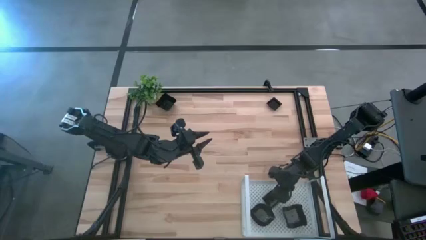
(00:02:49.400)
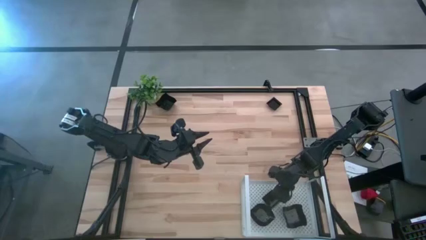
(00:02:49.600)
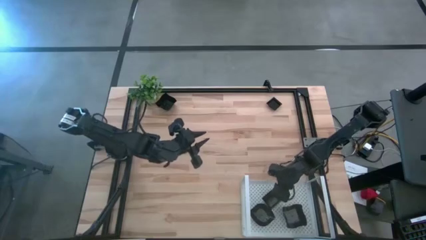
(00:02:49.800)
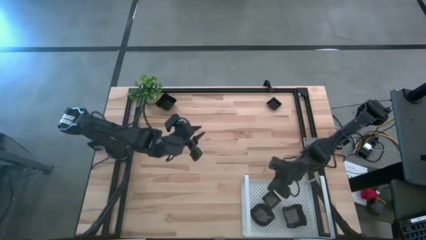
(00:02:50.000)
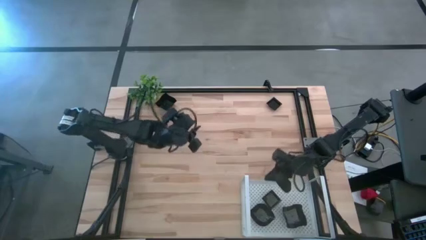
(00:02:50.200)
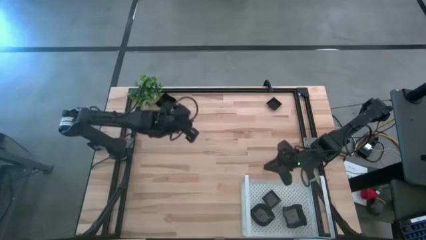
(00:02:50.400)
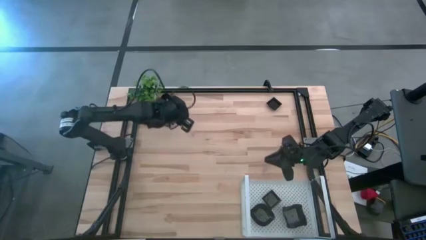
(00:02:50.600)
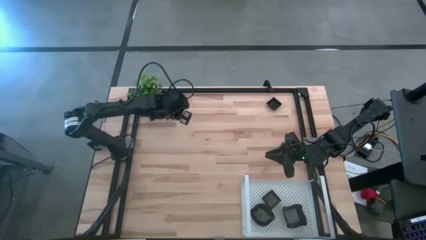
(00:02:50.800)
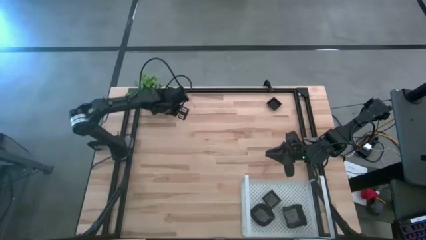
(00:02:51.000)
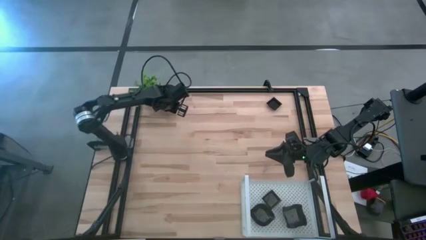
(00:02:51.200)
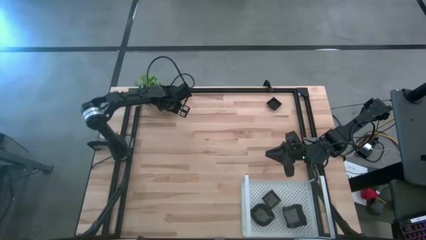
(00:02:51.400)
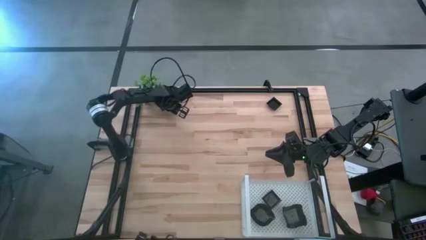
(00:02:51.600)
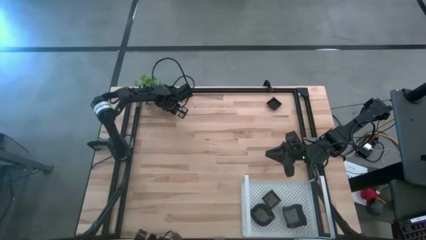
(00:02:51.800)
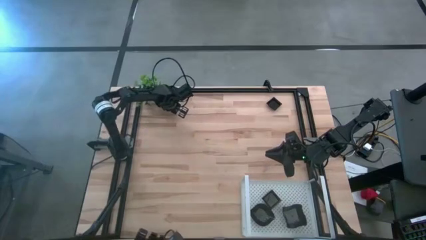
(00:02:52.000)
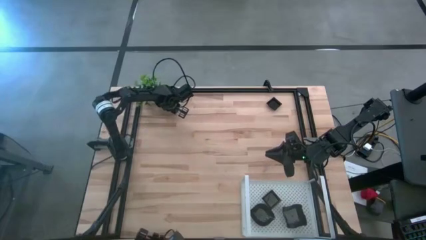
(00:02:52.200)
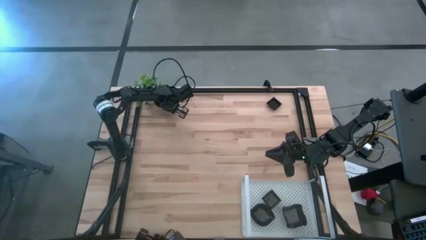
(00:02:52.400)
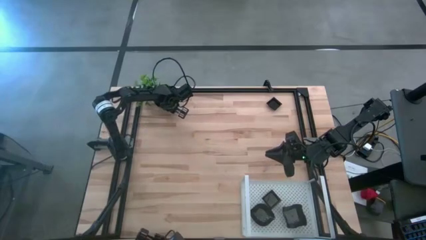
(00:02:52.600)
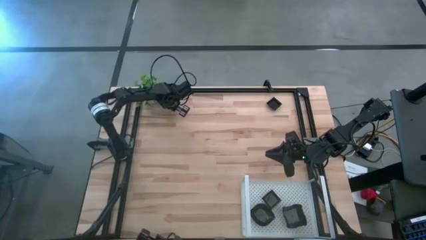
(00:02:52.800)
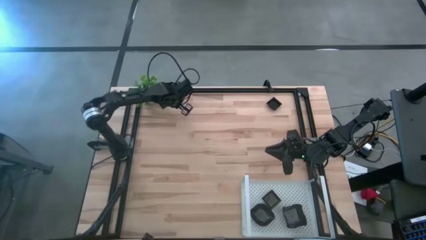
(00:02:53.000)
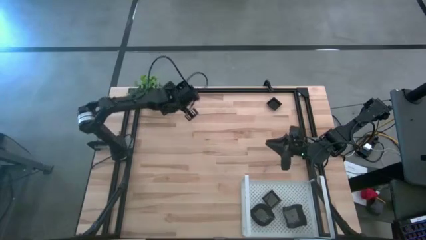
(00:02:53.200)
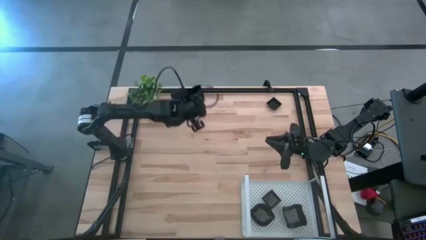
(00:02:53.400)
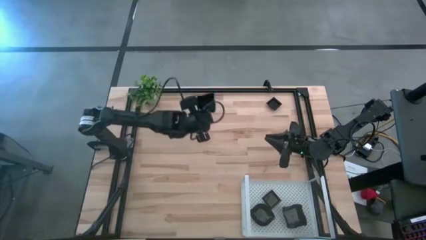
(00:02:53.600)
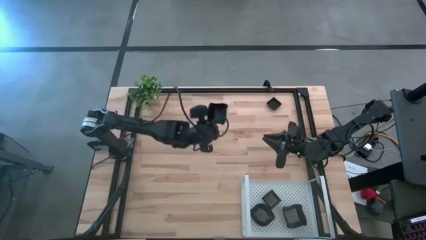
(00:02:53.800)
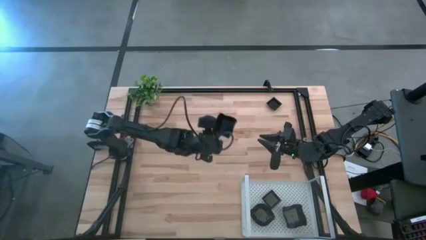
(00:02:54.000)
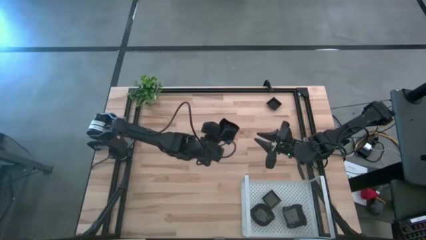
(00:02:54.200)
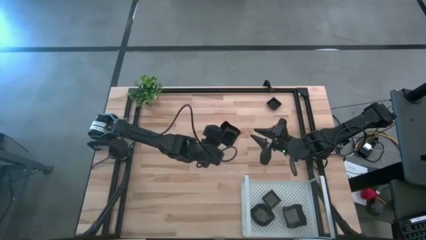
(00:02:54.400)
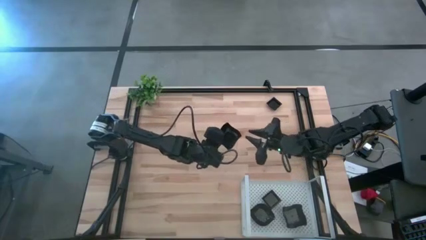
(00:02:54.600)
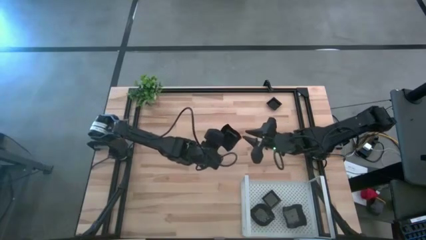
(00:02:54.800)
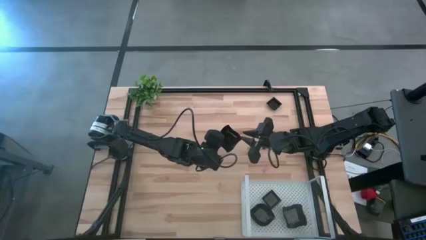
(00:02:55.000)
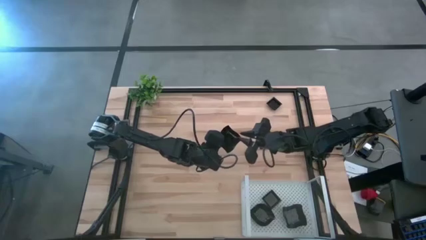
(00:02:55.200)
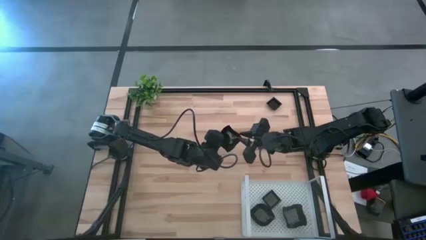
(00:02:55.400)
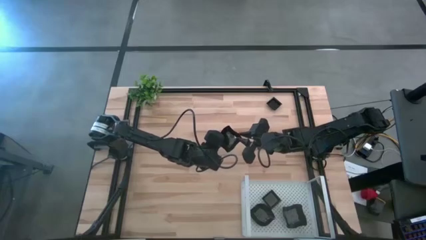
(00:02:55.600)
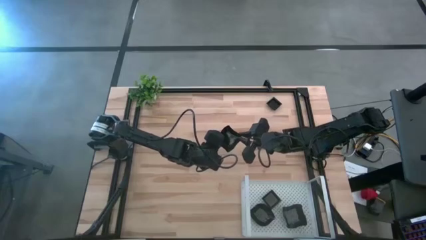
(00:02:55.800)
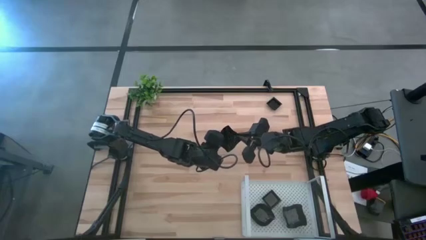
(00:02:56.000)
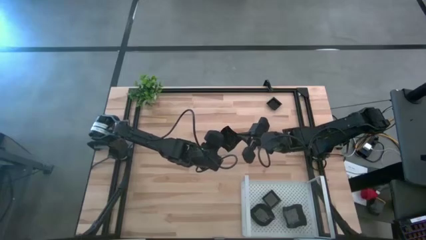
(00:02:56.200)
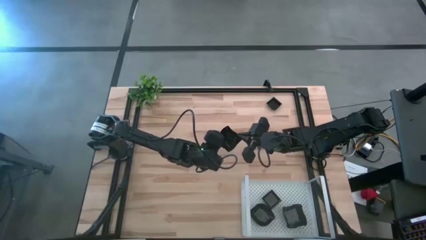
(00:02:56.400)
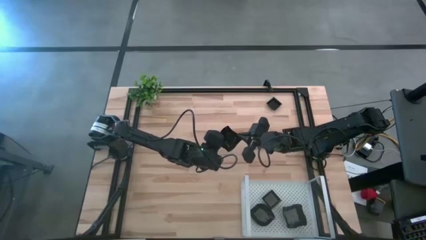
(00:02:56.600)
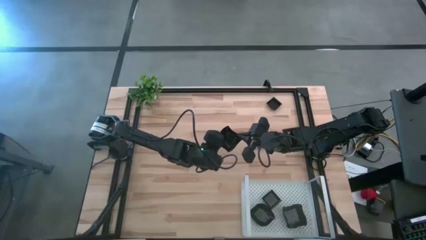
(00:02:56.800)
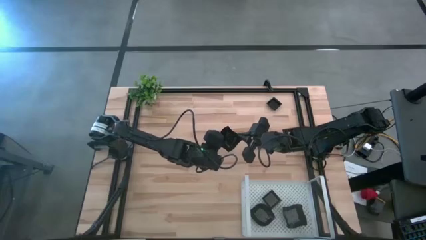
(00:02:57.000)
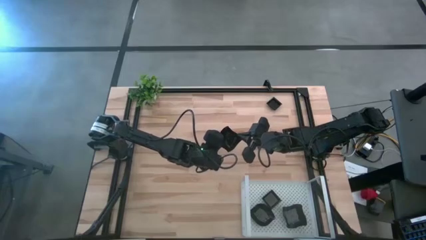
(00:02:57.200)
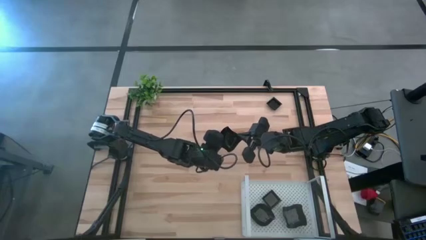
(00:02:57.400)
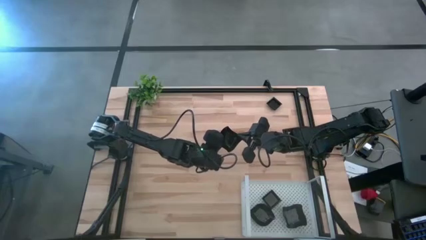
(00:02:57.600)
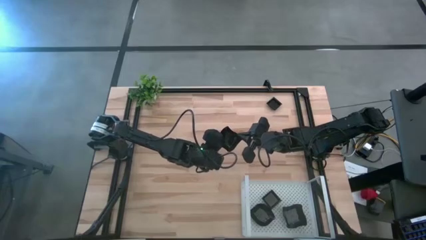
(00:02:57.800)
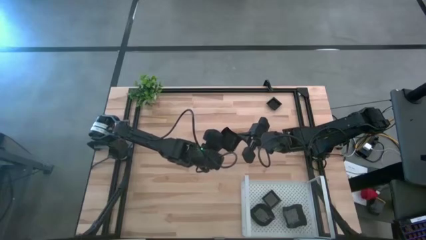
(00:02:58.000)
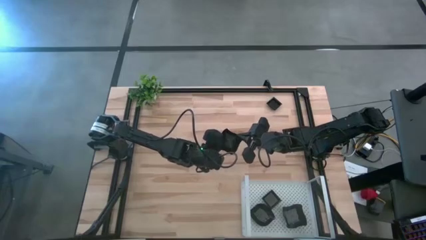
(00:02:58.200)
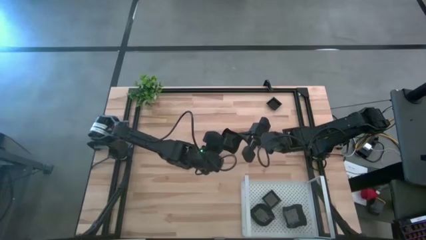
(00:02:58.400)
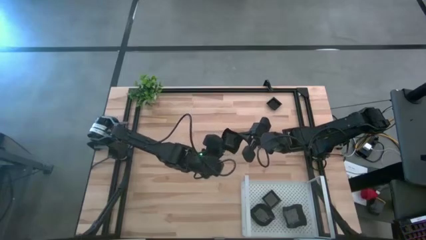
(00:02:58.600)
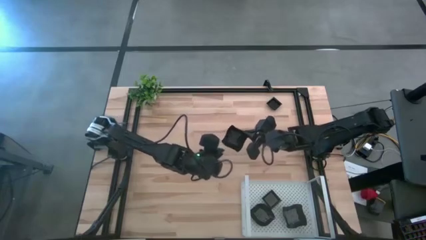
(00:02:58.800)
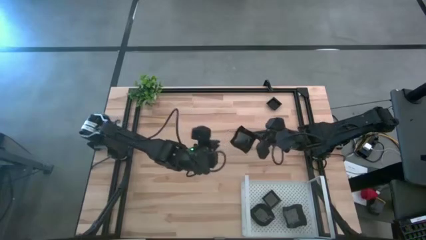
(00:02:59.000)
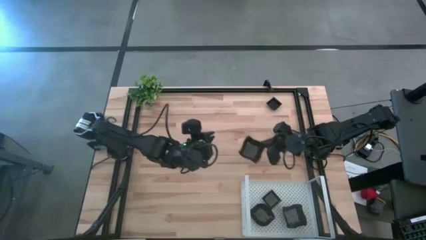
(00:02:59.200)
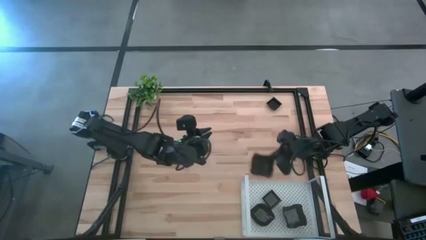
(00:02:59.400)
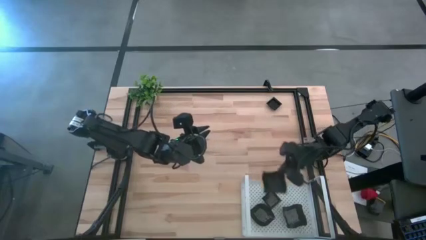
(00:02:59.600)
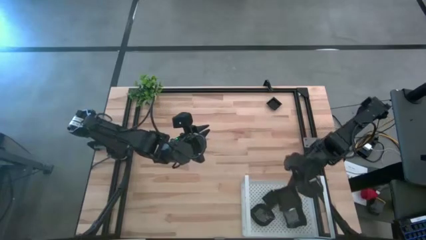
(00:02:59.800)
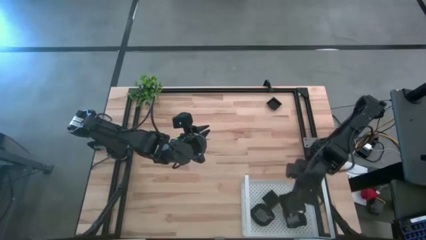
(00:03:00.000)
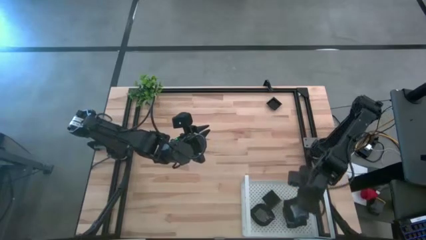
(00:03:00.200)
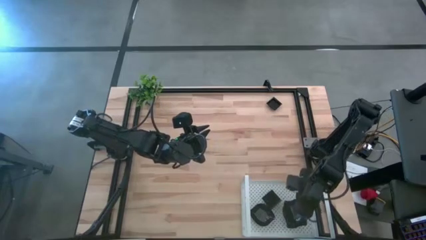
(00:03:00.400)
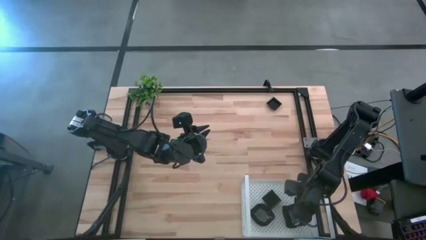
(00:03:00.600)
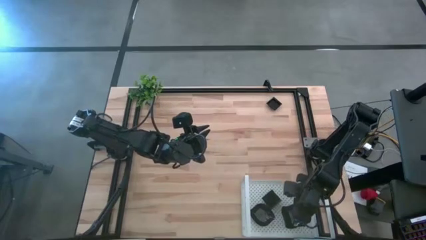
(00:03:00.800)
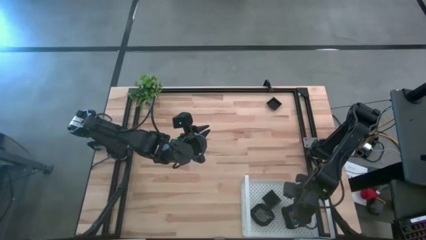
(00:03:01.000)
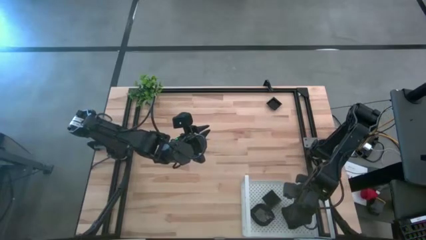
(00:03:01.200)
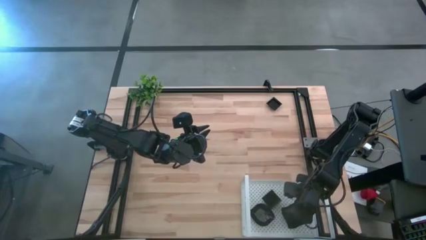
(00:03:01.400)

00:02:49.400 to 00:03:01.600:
Task: Pick & Place Mini shaped plates
Stack the distorted square plate on top of the other distorted square plate on the shelf

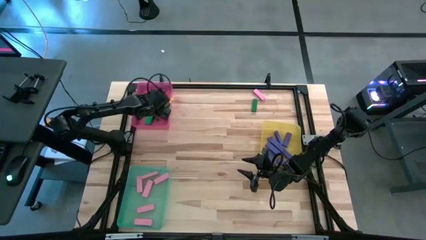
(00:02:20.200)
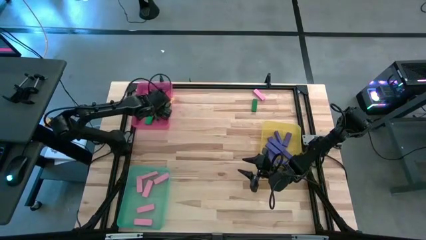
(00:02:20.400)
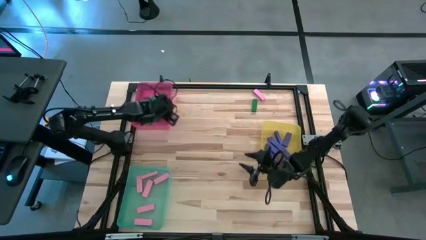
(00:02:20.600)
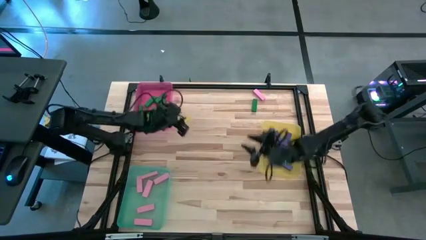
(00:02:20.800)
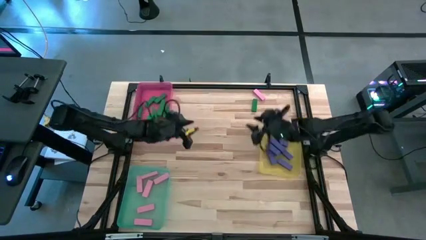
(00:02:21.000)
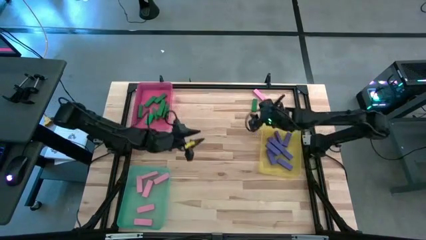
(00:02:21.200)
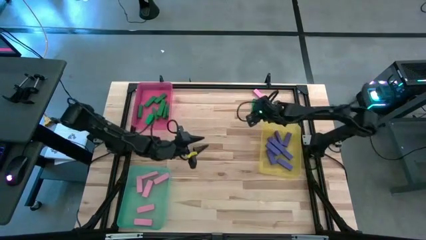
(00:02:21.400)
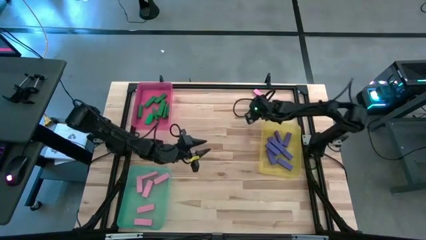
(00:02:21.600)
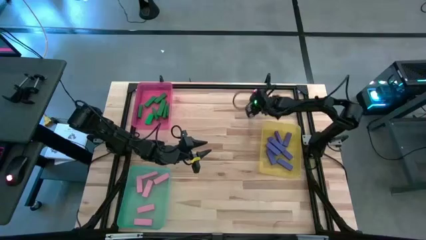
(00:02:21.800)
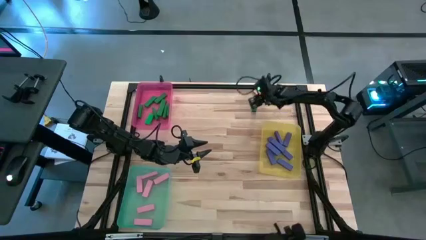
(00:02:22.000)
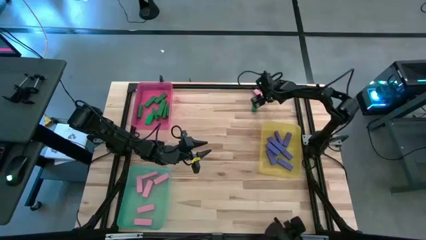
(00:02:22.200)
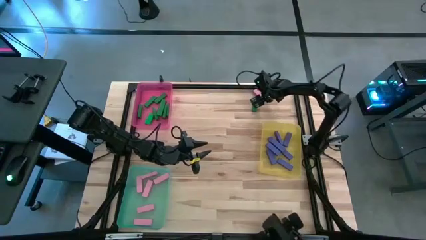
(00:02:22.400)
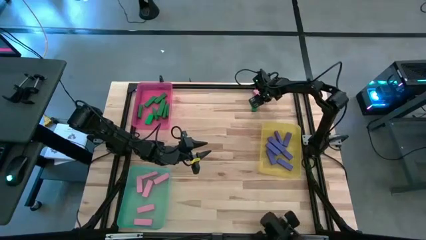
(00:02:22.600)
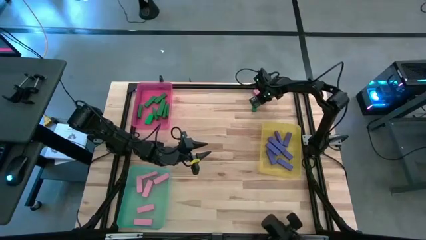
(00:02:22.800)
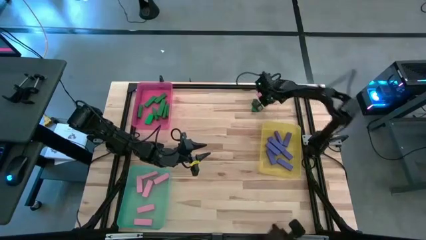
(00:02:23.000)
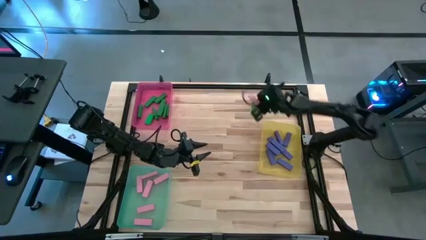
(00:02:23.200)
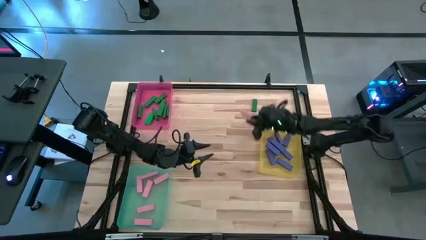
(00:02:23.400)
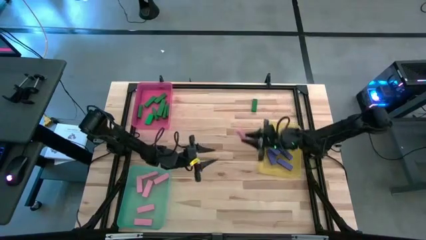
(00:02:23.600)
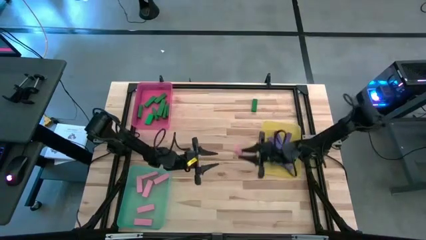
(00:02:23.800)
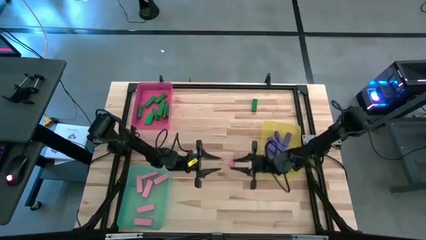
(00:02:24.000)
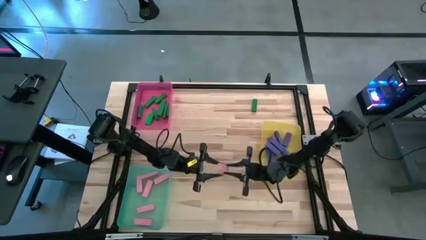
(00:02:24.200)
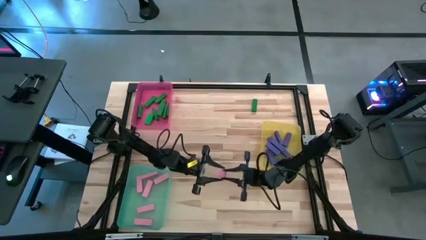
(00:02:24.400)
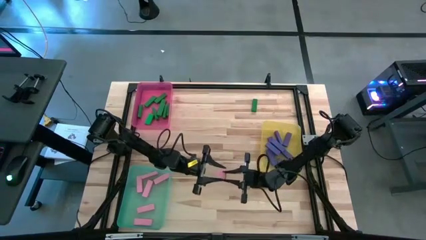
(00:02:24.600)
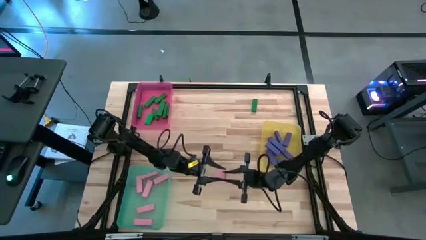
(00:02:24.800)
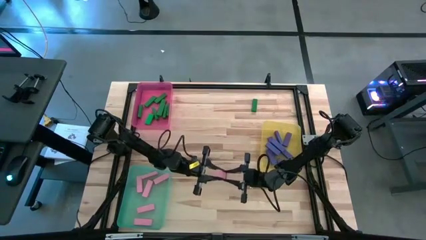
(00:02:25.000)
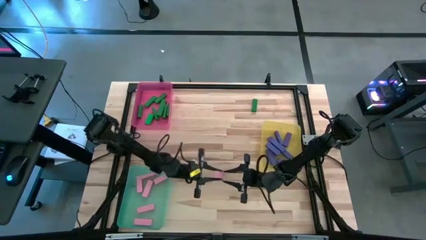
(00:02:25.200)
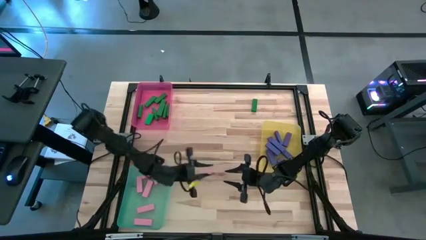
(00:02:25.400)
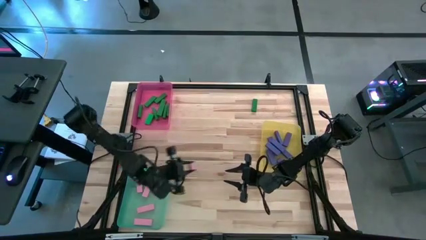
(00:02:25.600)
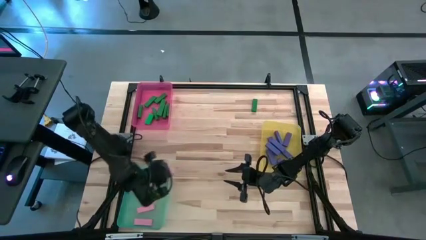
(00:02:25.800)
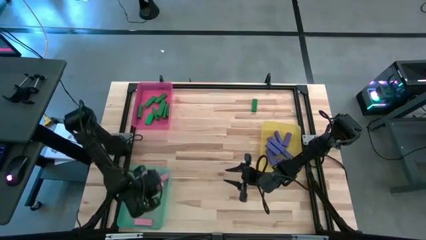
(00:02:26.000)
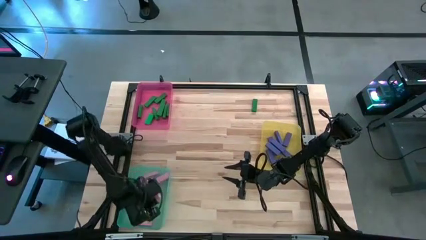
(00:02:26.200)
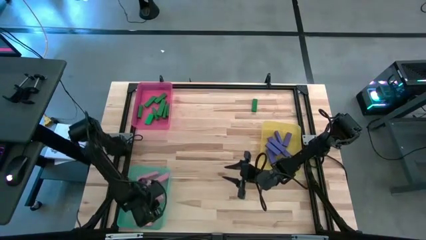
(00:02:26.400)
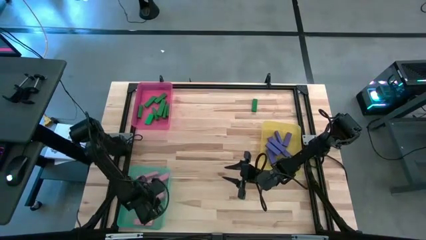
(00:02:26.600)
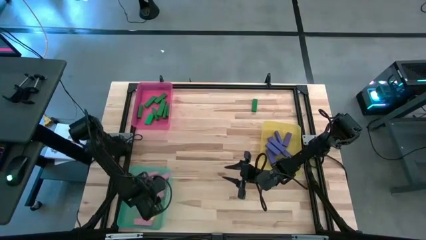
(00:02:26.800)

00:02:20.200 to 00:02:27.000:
Task: Sort blocks
Put the pink block into the green bin
